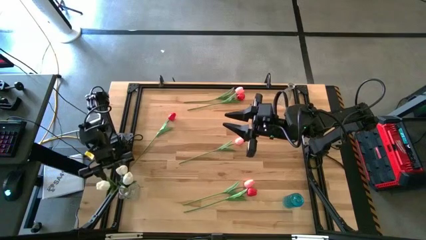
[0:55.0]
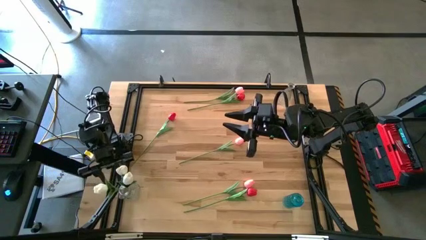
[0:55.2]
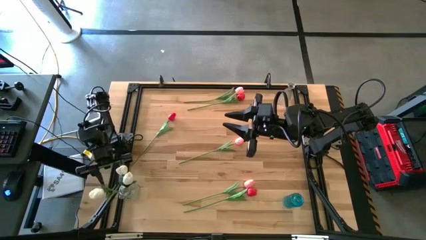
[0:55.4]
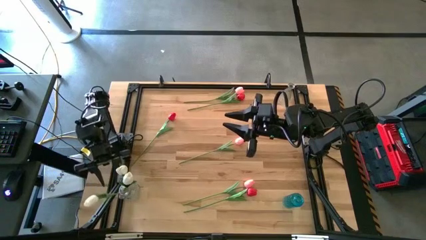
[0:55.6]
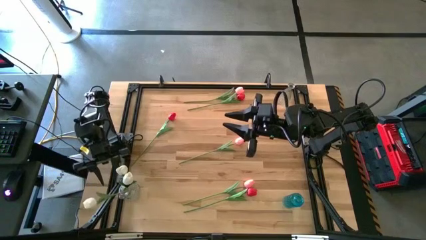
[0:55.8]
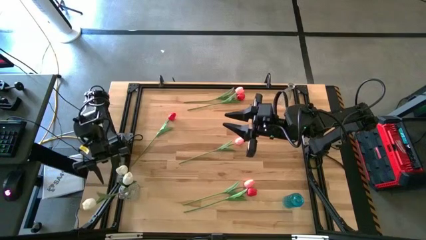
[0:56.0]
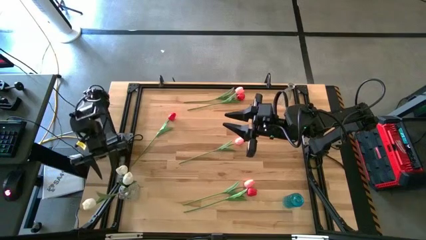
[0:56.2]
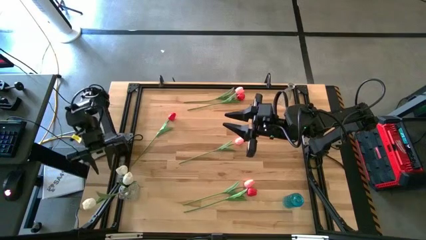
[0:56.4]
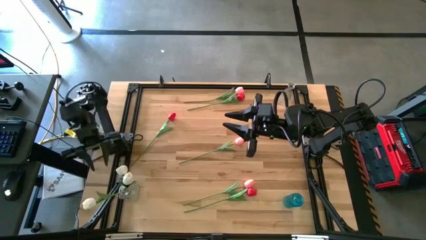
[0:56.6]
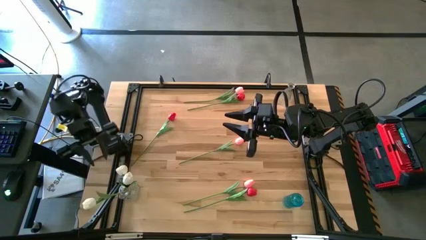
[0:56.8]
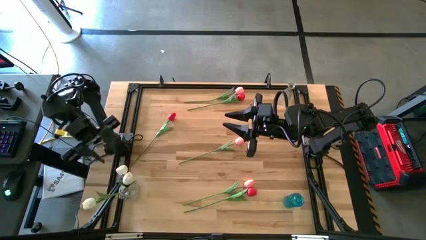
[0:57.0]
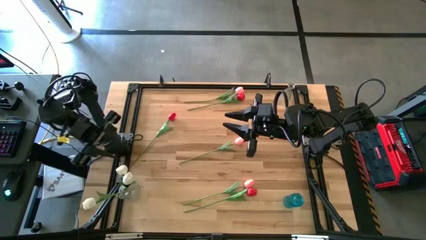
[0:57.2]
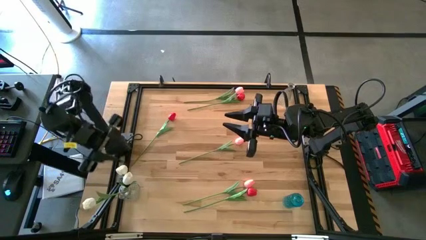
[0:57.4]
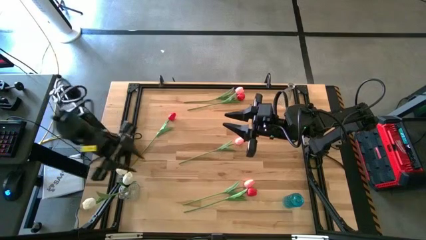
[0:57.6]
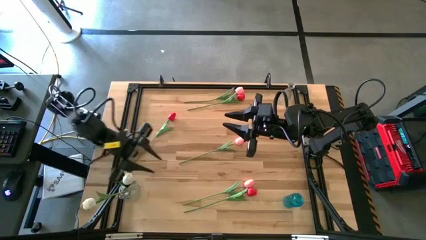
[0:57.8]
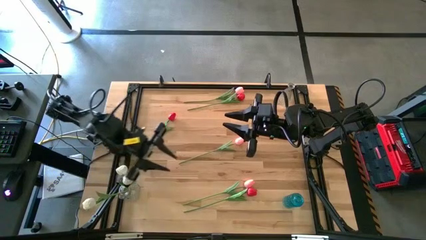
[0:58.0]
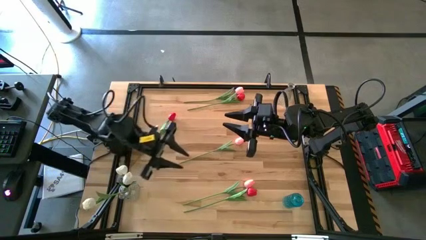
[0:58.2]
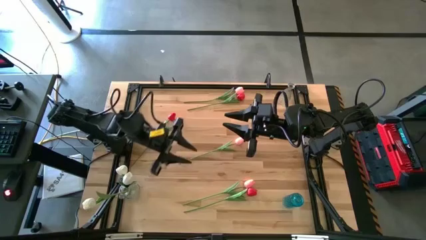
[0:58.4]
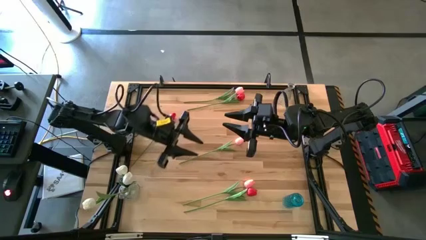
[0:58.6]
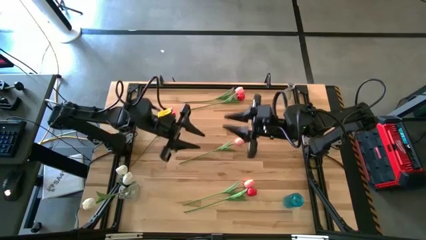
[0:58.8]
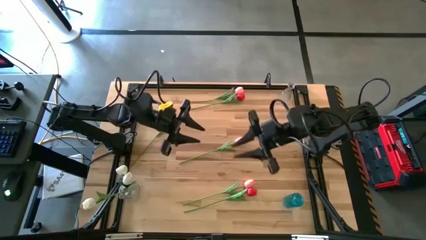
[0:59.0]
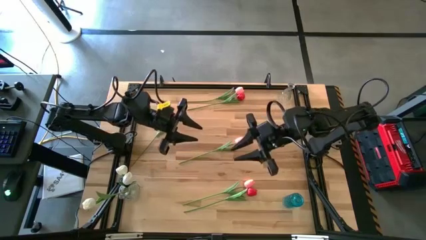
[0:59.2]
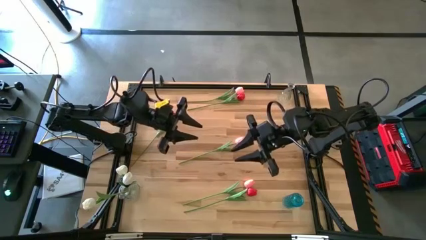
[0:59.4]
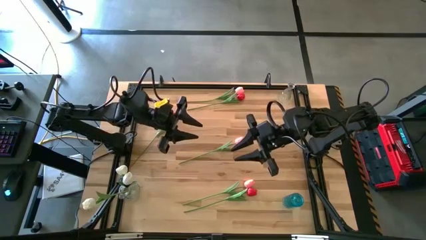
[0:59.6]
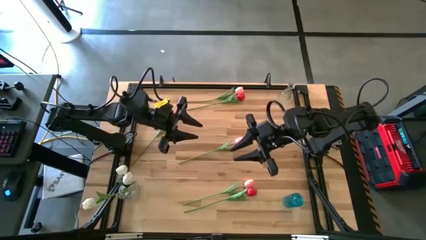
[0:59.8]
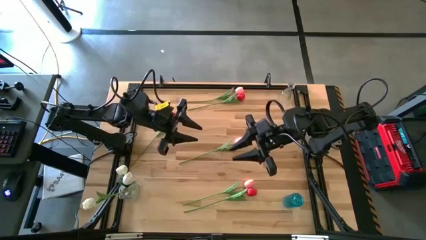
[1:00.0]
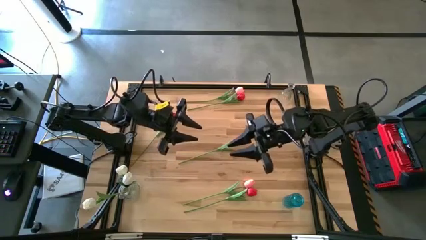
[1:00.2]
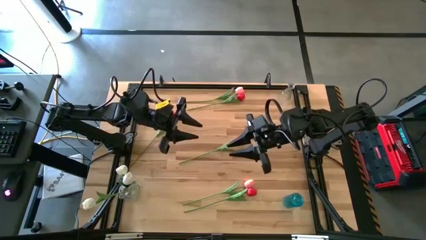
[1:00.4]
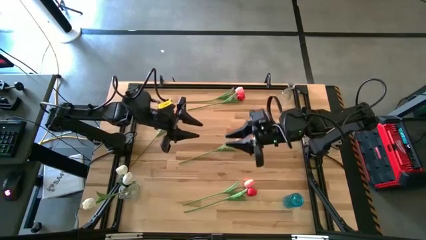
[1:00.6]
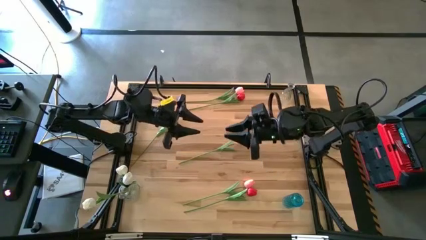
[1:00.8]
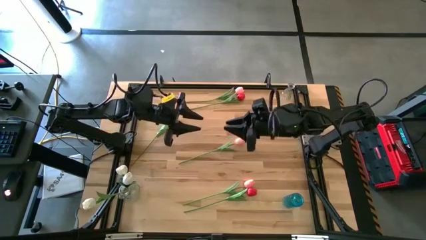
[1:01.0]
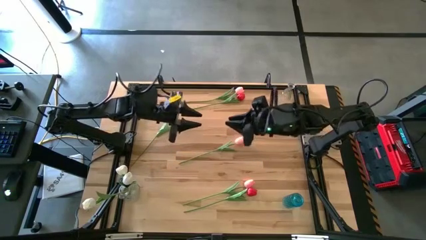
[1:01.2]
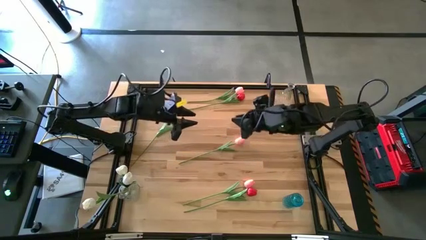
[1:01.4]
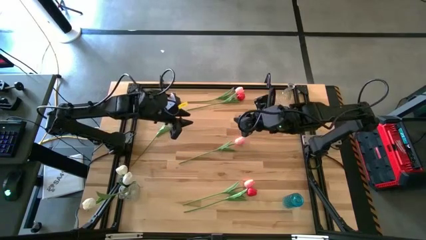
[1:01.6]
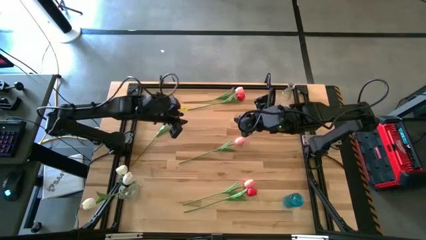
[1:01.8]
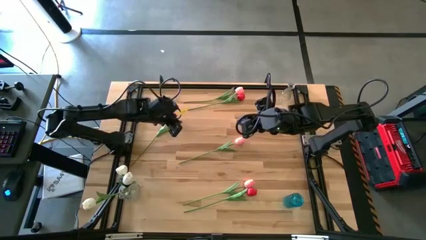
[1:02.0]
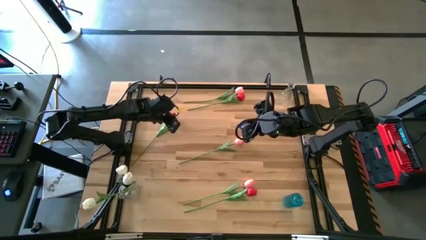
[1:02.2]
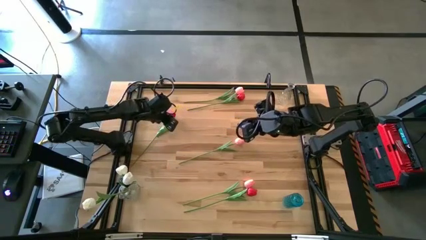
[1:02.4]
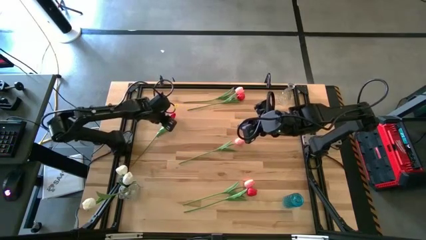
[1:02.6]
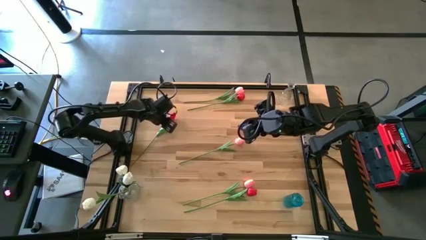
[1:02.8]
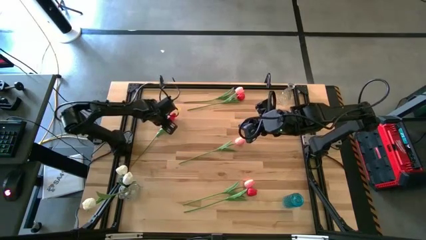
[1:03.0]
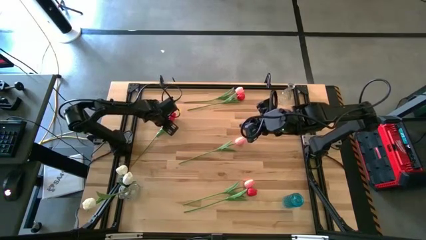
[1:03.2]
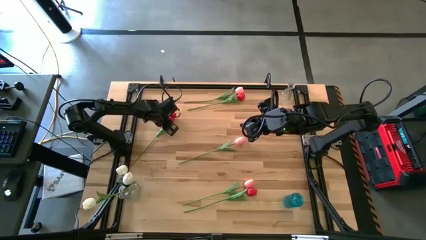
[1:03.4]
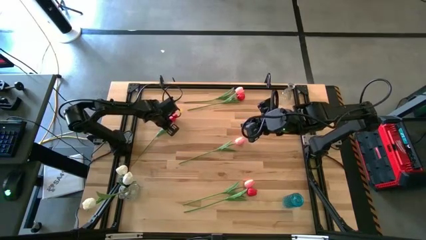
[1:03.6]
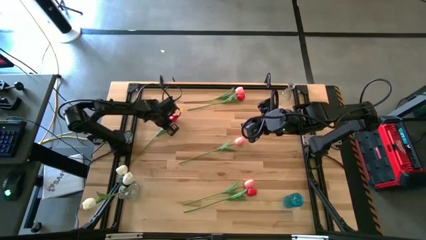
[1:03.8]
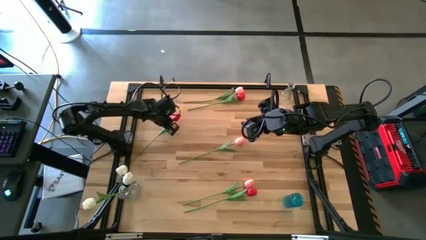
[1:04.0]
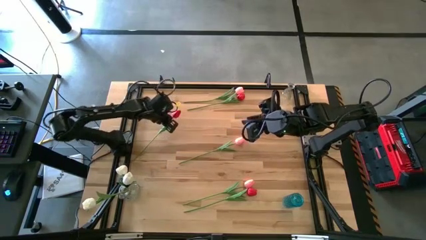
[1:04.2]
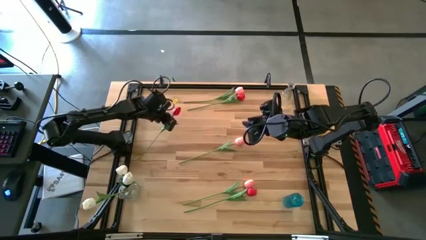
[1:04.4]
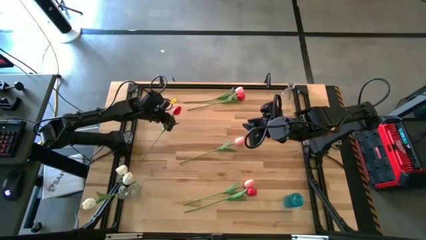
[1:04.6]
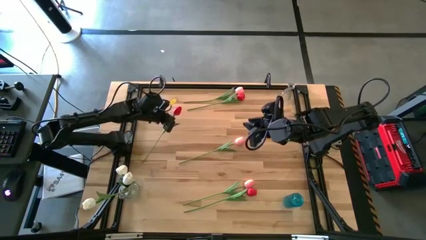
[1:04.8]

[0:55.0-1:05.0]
Task: Sort flowers into vase by color
Put the middle red flower into the blue vase

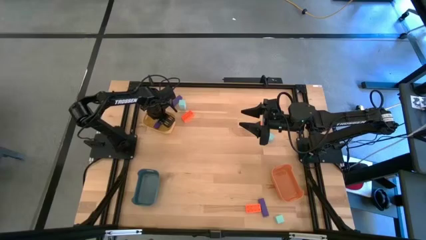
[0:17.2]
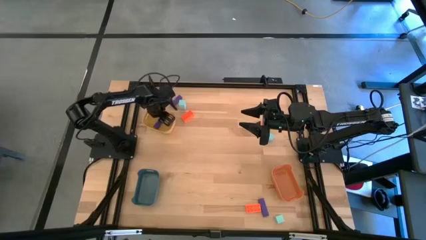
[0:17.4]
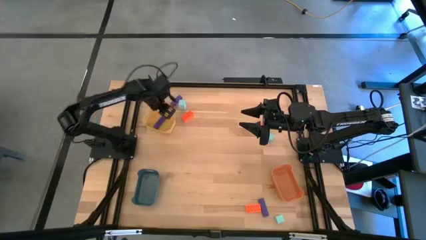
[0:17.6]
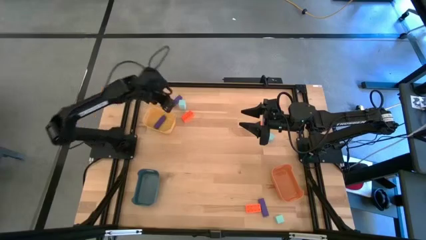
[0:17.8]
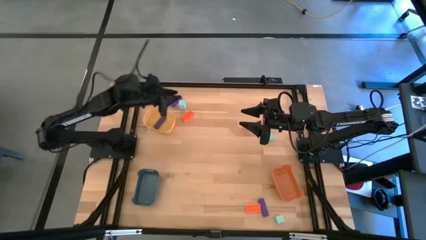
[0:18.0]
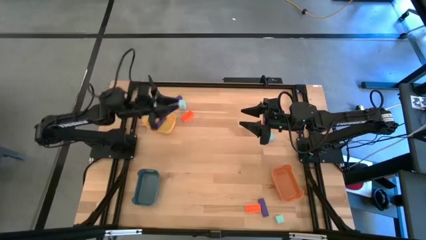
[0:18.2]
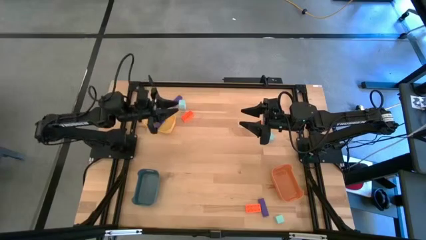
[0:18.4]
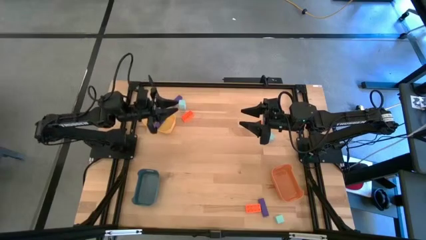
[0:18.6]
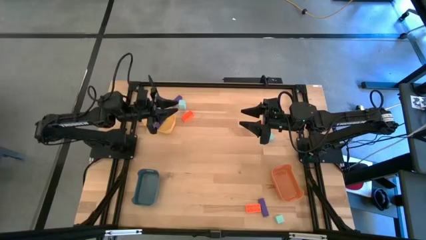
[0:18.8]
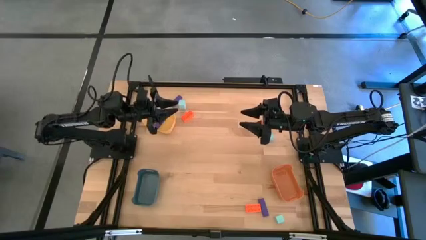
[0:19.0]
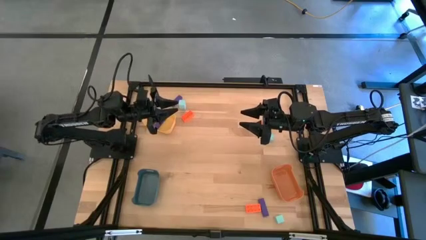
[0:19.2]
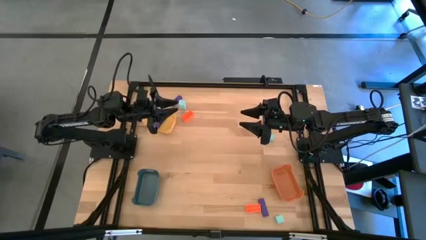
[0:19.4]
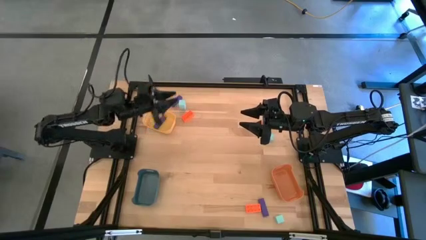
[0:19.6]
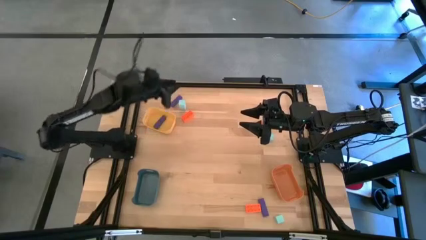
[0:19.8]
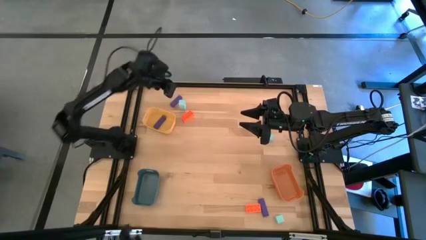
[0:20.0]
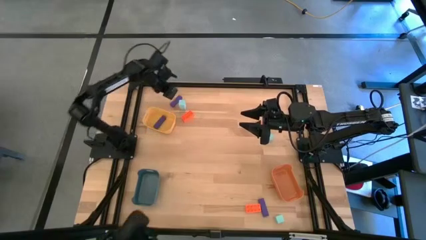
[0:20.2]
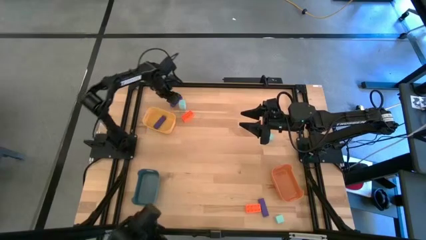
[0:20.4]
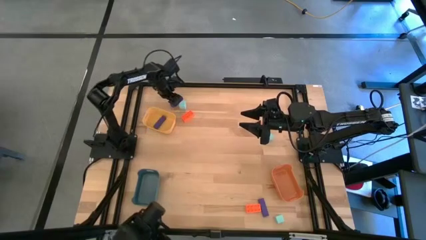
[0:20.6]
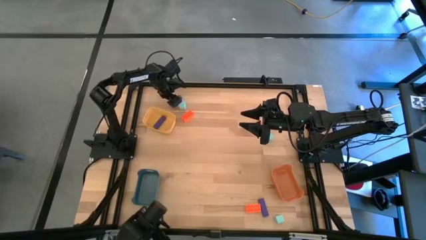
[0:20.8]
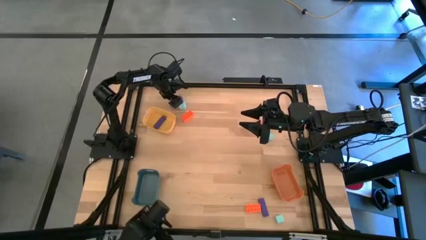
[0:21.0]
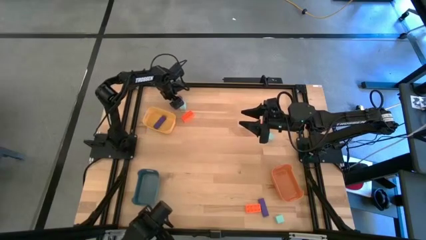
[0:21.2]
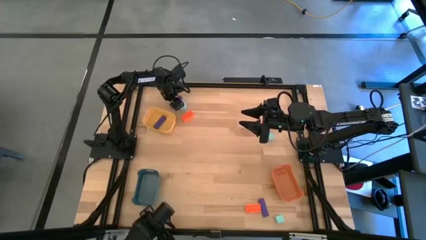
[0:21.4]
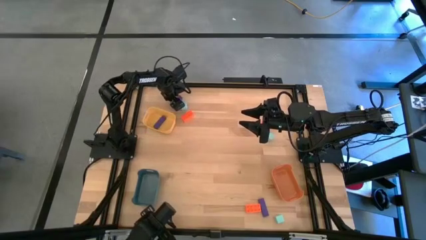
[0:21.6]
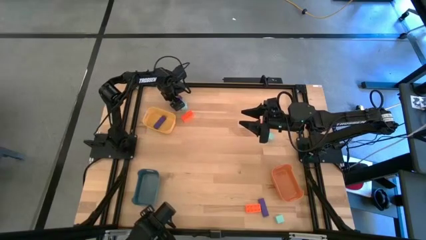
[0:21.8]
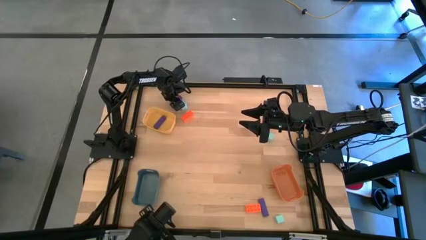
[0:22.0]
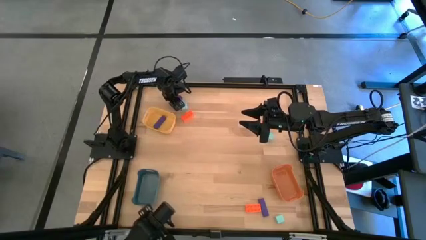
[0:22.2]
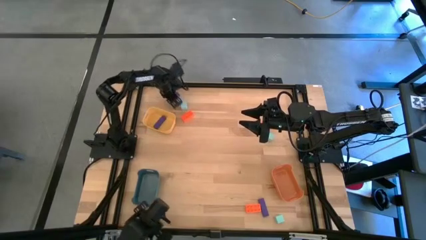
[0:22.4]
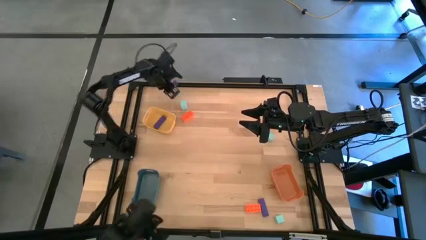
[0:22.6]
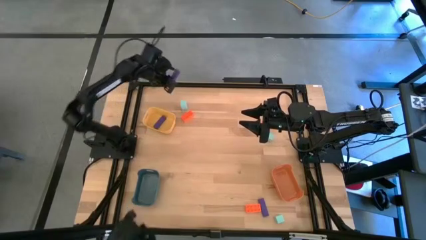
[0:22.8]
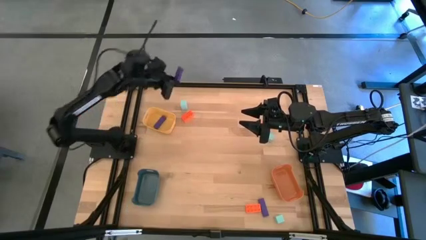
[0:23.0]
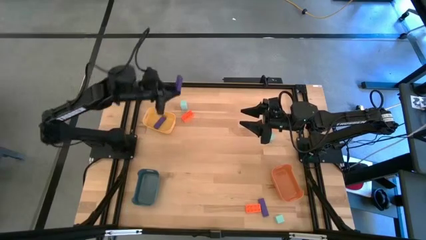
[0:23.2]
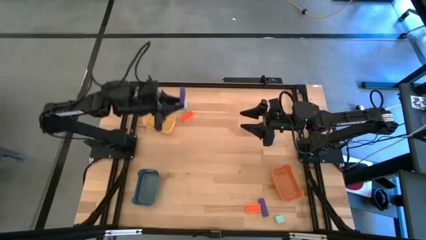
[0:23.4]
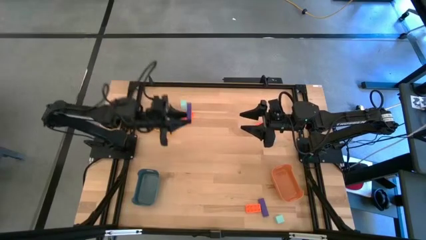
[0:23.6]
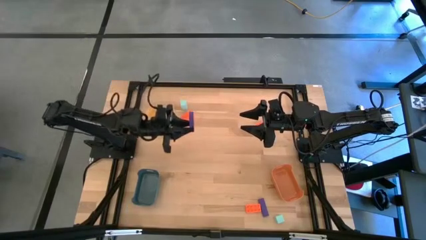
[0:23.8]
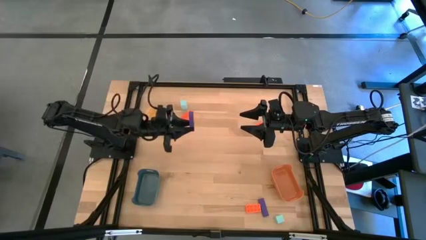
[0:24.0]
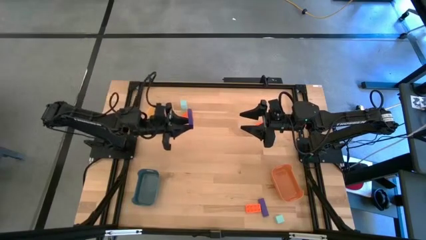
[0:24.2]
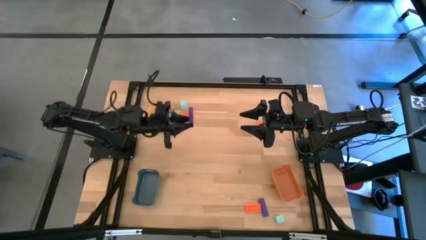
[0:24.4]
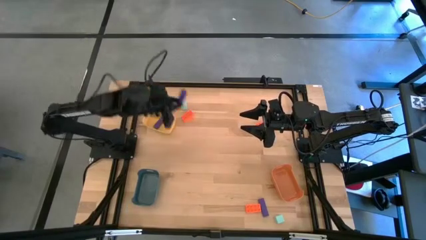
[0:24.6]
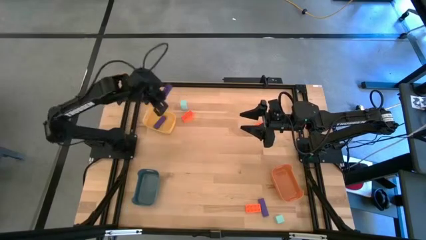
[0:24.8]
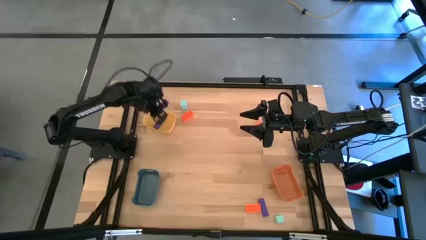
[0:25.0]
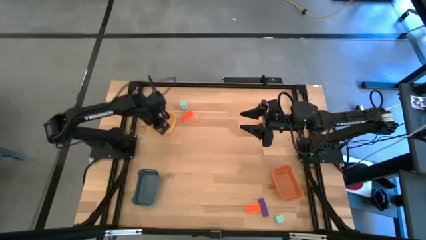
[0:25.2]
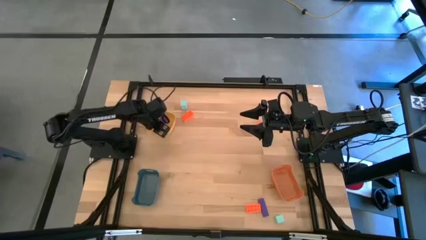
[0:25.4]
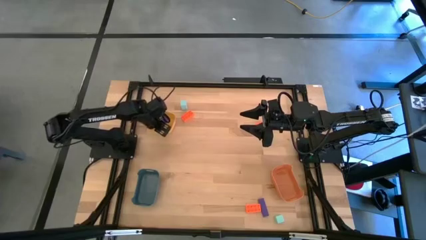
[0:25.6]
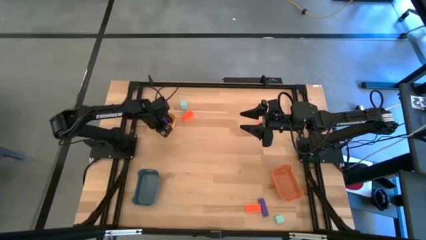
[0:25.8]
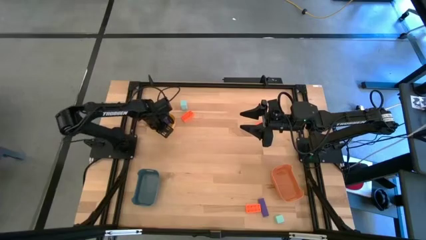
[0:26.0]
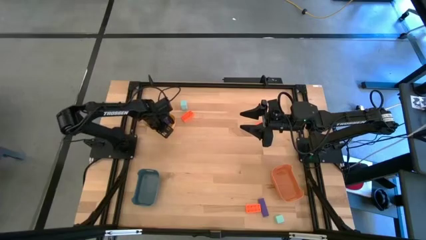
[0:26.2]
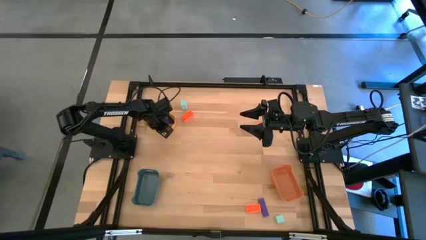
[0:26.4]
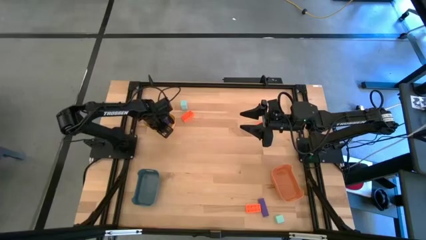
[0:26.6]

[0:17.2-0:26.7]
Task: Sort & place blocks by color
Put the top violet wooden block into the yellow bin
